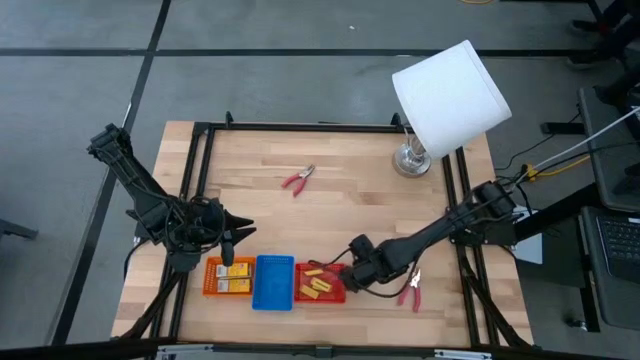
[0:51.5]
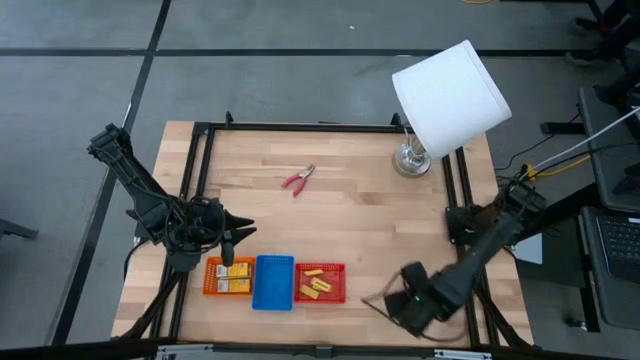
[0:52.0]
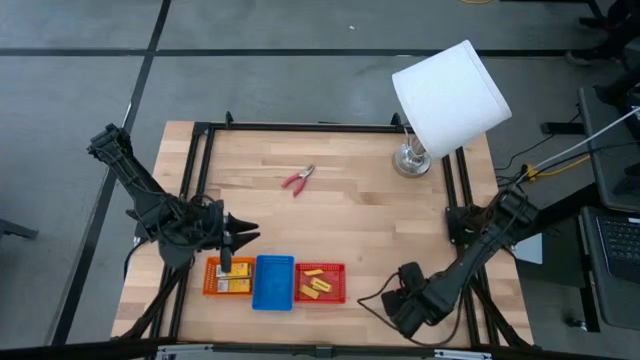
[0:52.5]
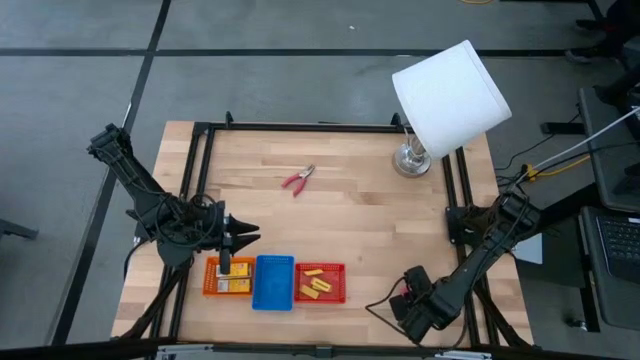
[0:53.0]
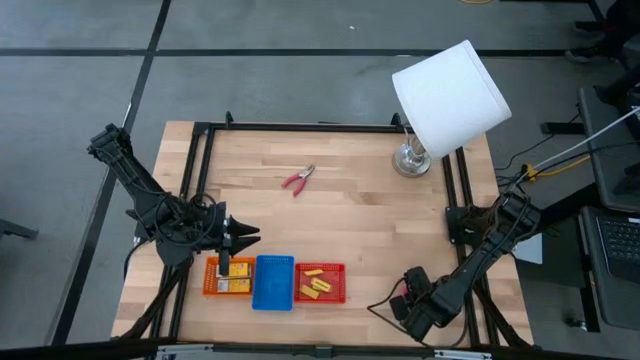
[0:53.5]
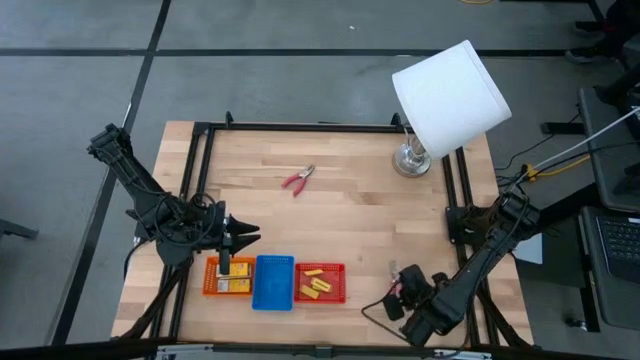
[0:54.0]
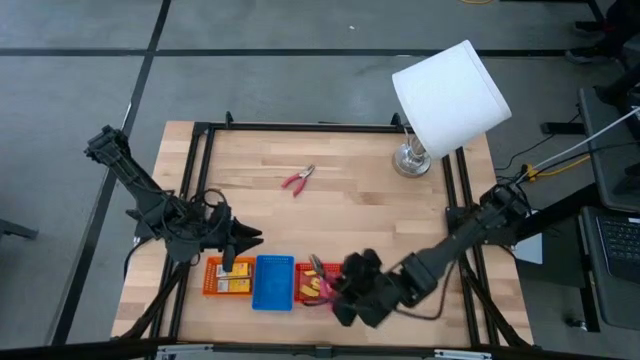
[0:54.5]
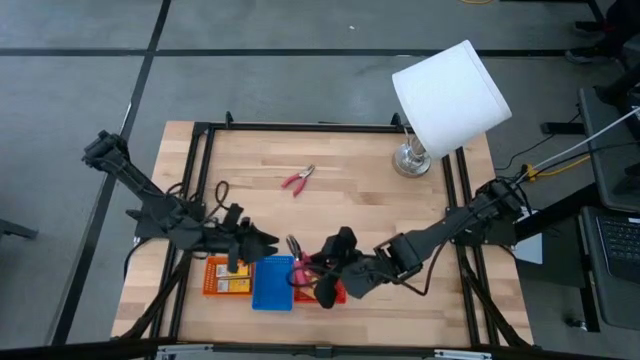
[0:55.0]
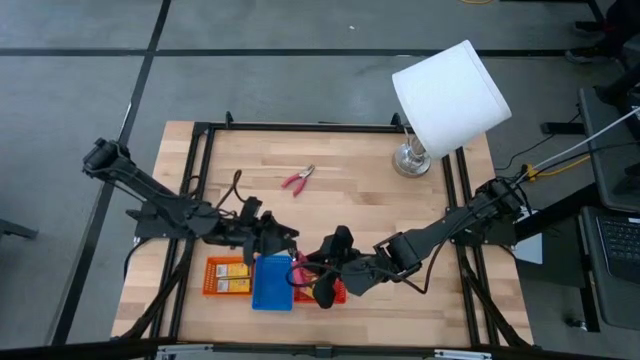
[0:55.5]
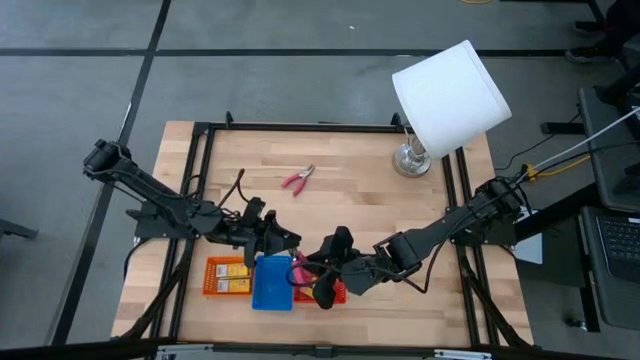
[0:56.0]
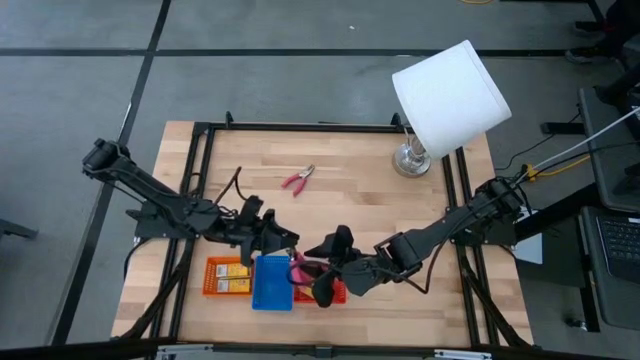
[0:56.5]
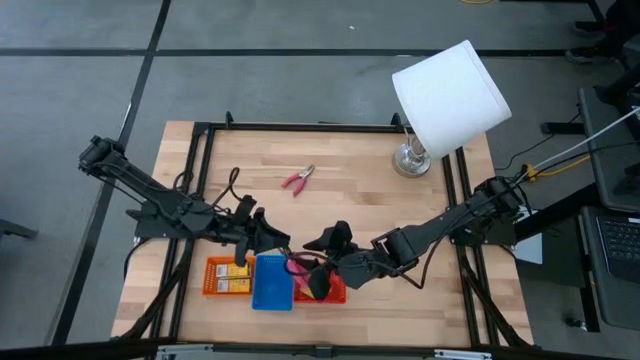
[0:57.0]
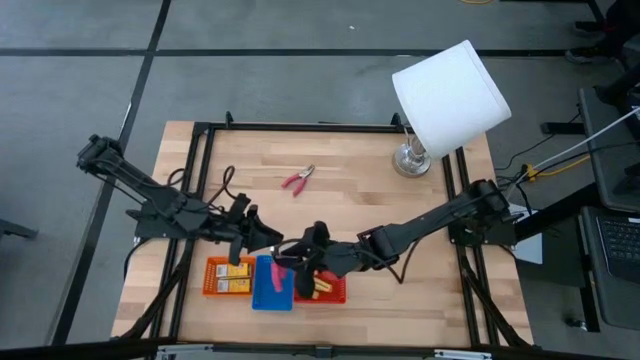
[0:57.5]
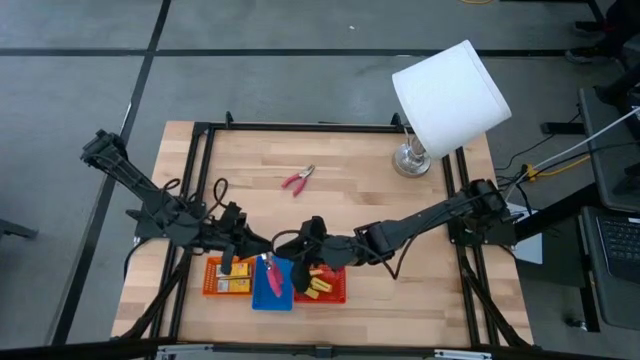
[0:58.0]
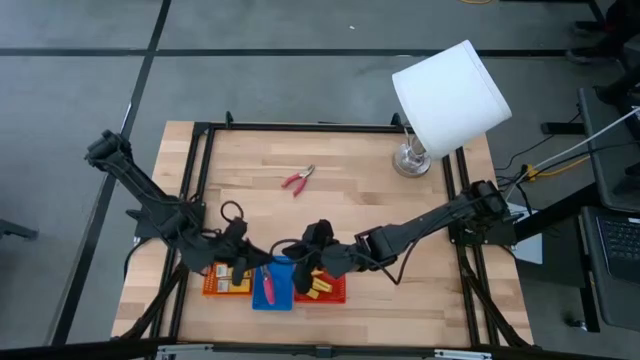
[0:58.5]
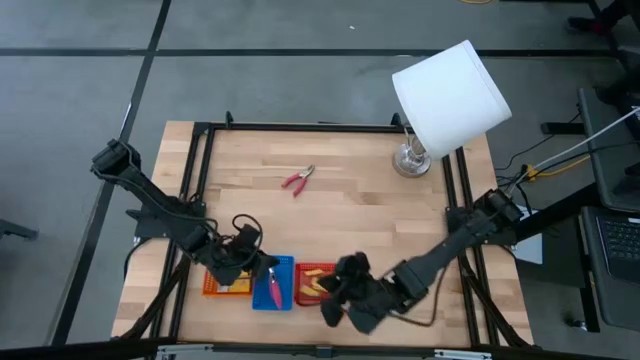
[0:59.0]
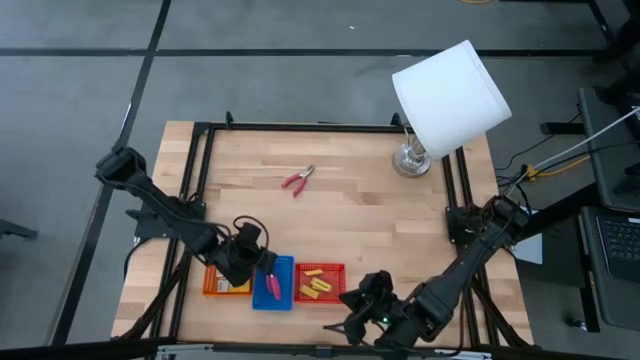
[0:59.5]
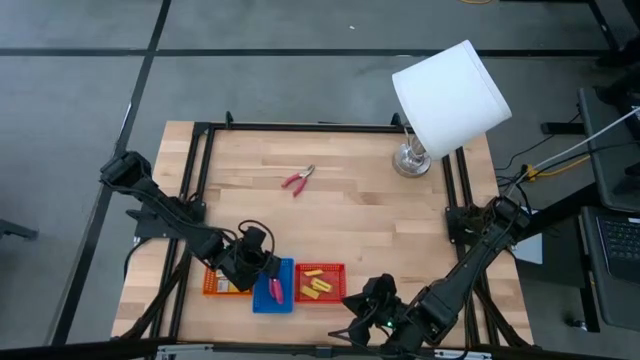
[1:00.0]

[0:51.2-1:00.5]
Task: Pick & Place School Supplies
Put the bottom hole puncher into the blue bin

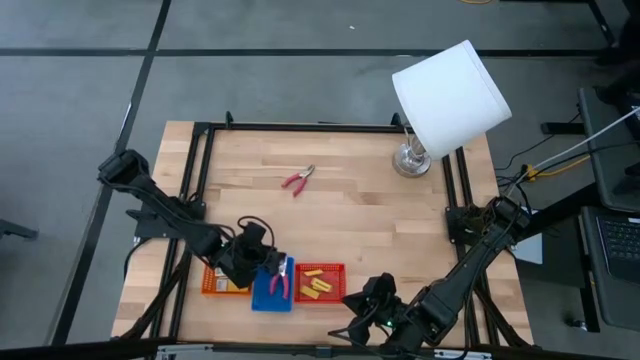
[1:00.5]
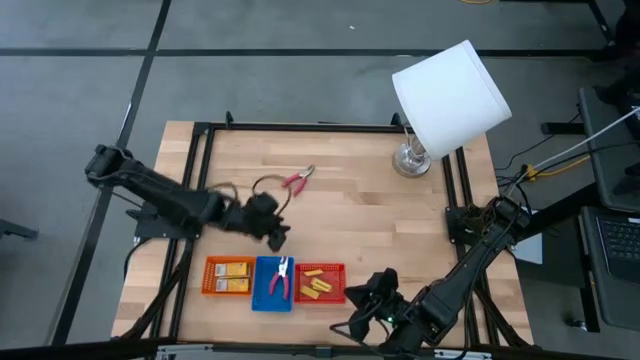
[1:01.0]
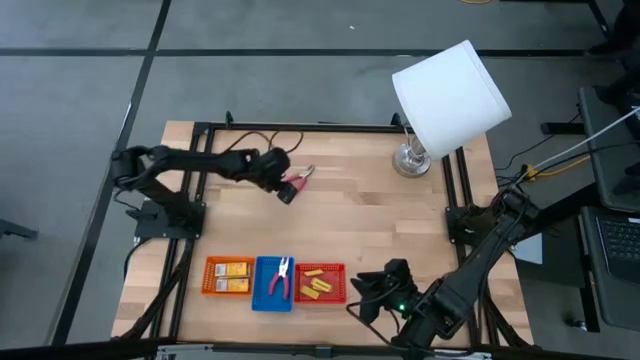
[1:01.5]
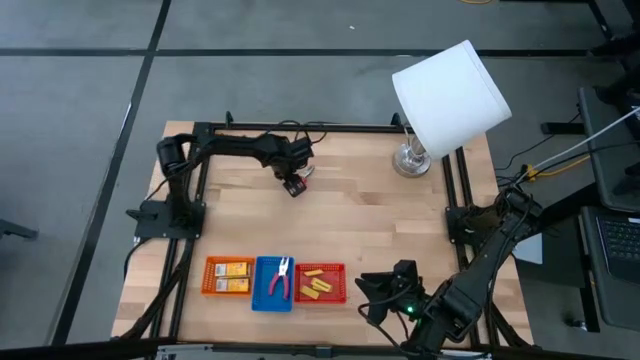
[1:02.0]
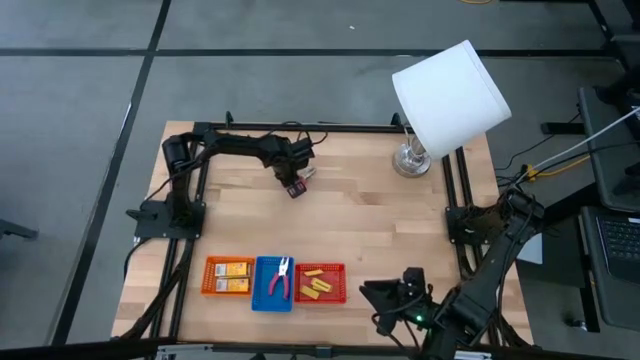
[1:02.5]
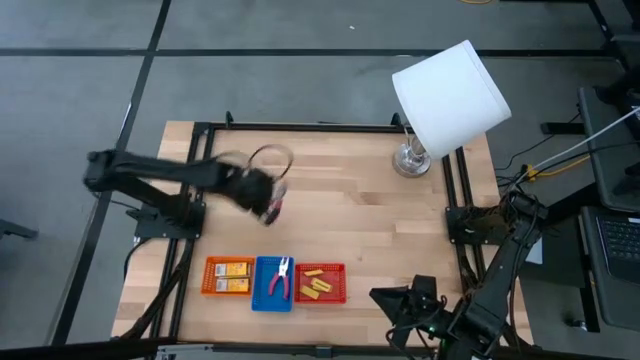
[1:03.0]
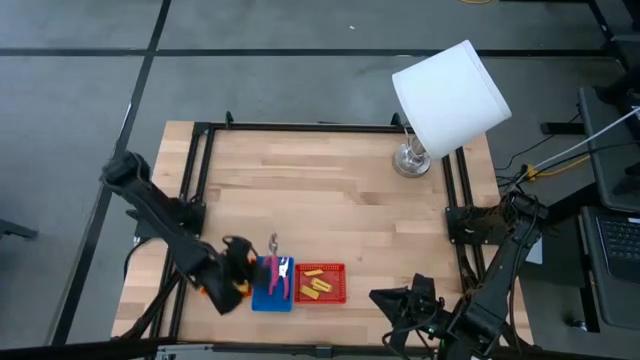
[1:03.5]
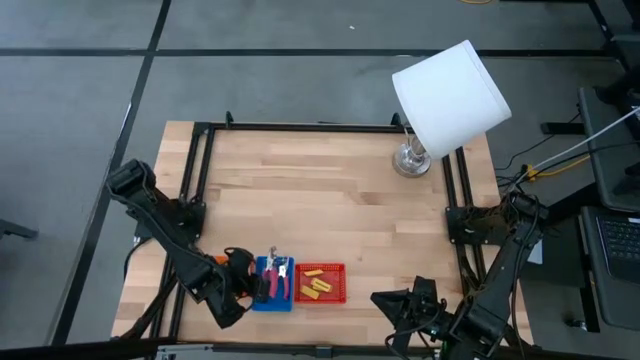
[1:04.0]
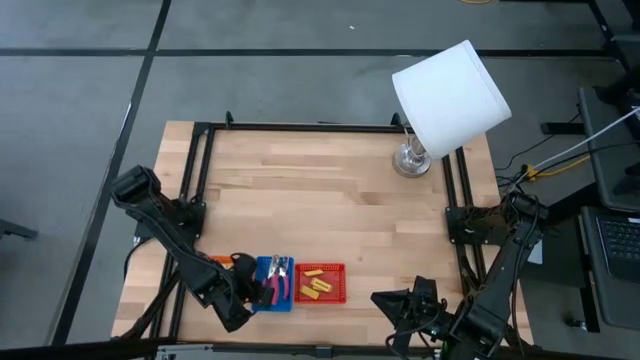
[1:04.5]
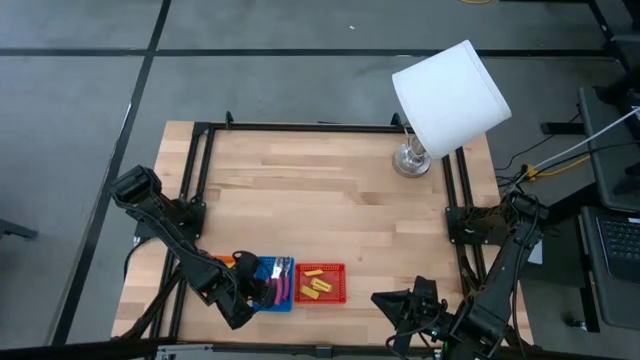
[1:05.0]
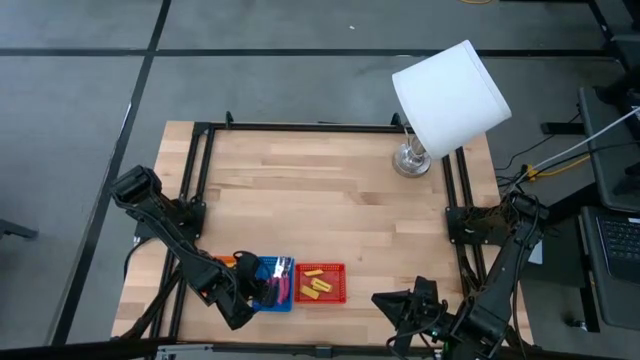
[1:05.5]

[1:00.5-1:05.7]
Put the hole puncher into the blue bin

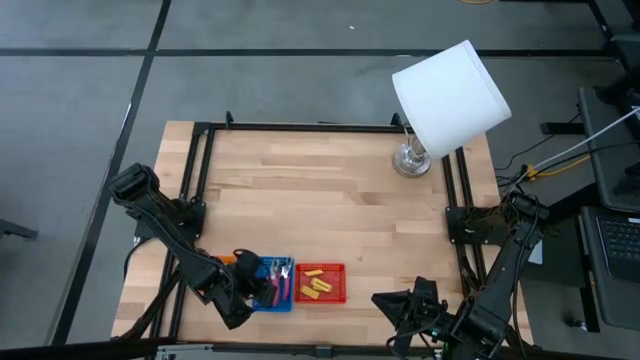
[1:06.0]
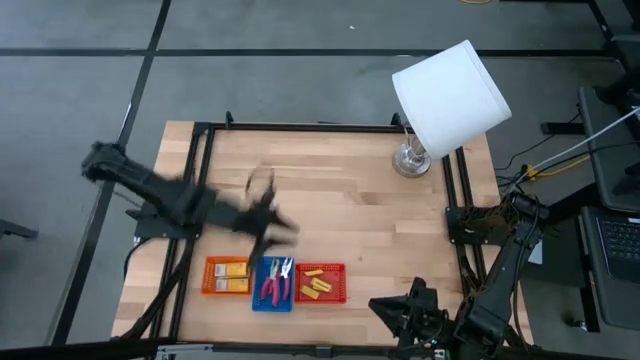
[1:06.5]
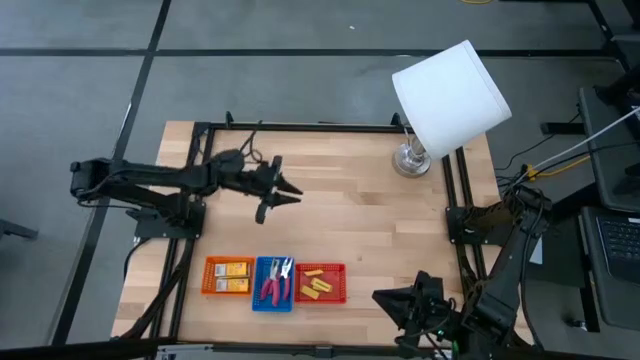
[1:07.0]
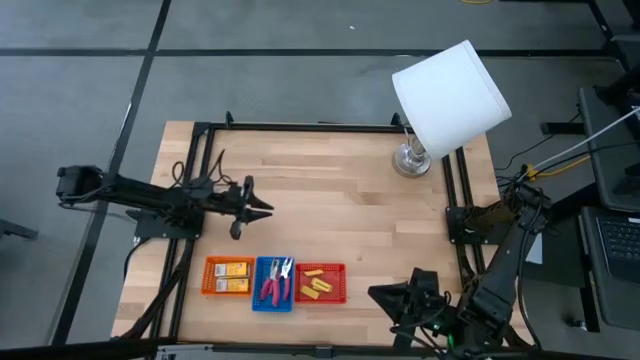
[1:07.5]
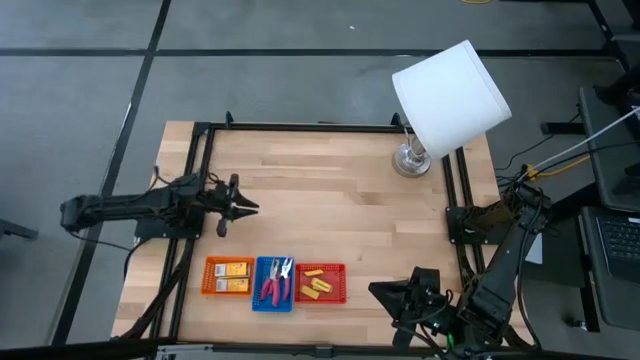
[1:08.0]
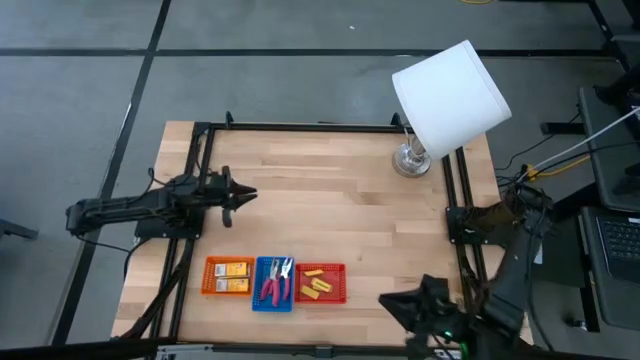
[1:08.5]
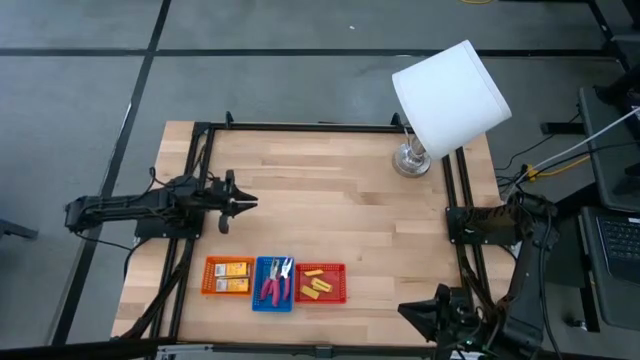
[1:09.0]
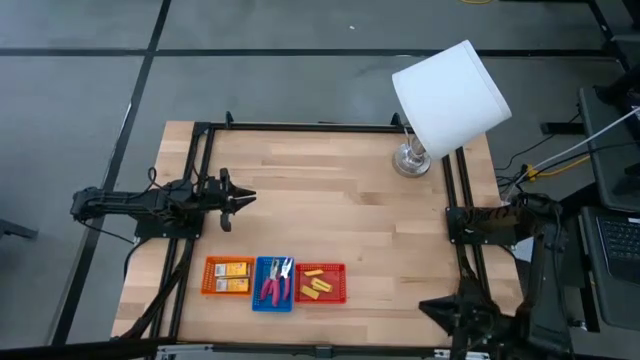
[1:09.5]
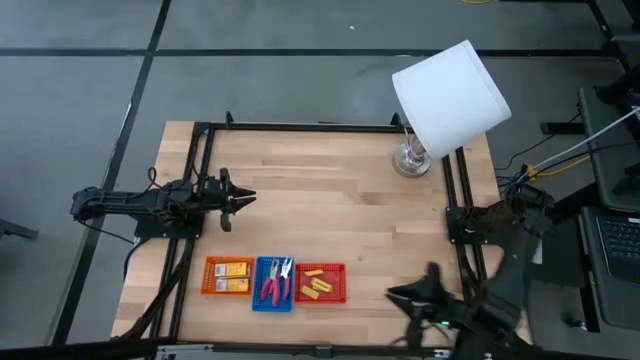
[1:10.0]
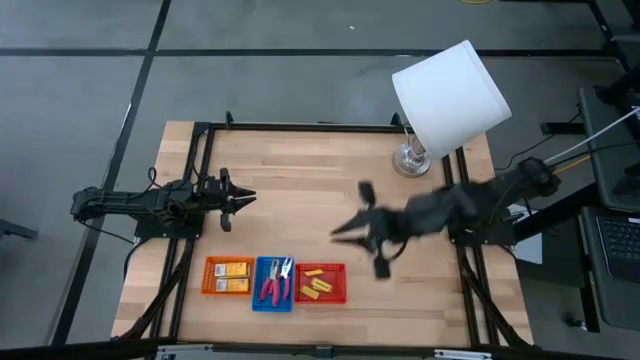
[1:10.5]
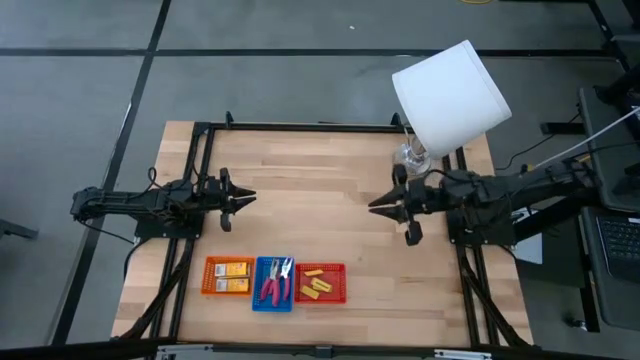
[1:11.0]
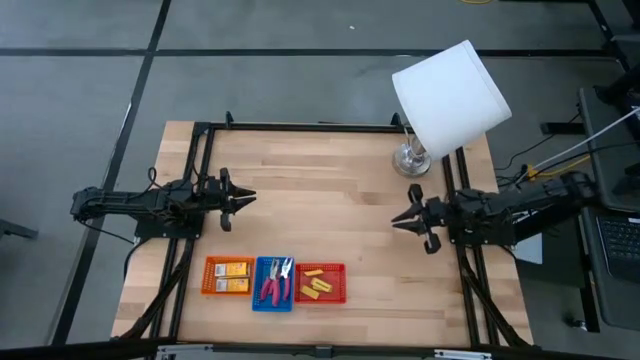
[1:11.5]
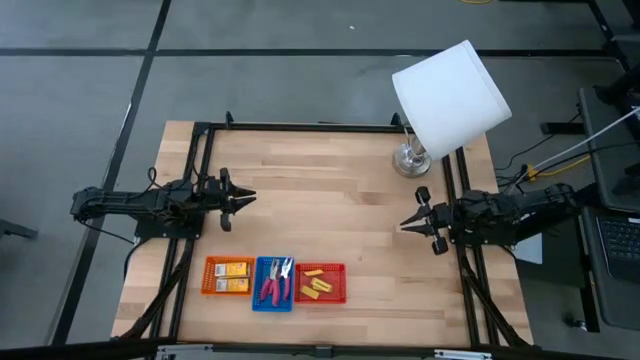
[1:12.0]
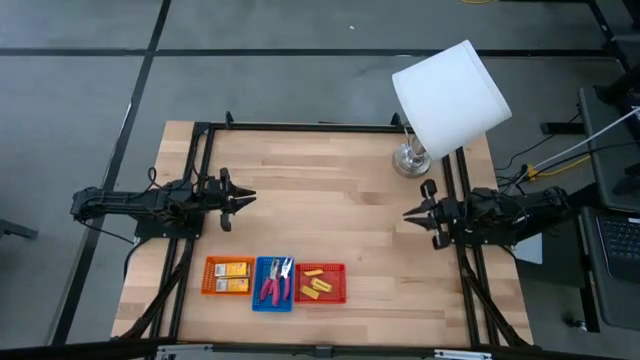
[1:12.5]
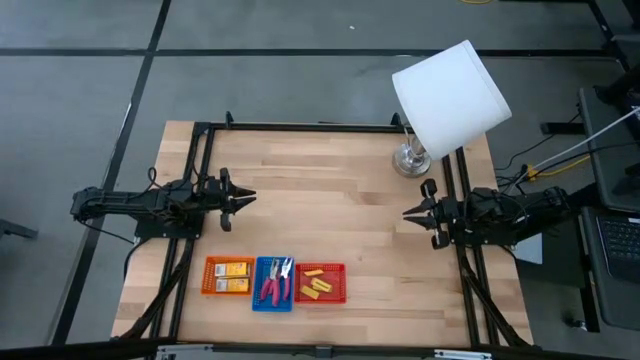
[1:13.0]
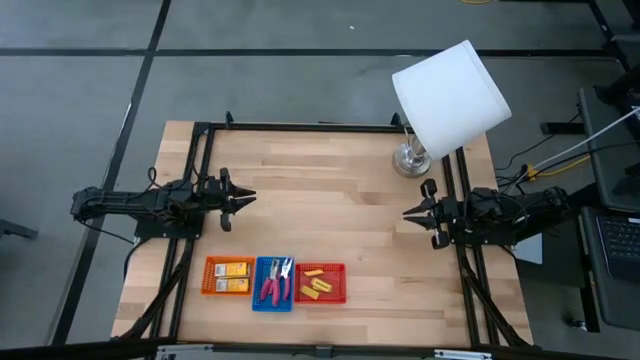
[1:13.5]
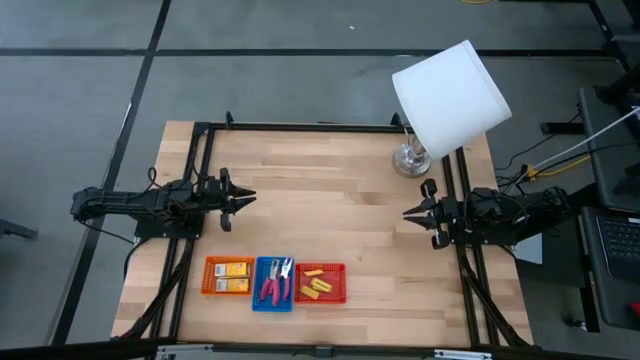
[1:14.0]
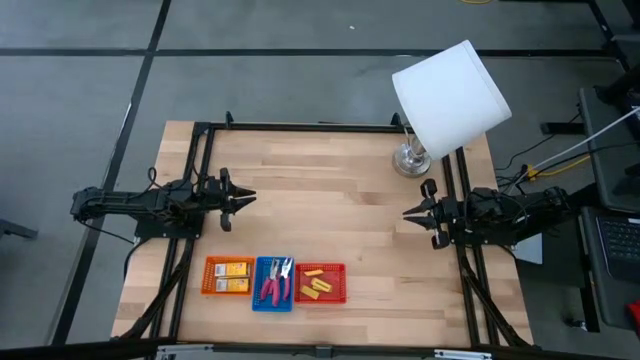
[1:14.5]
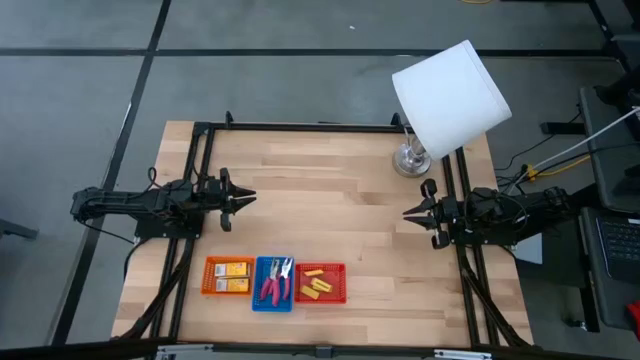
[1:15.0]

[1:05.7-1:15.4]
Return to home position
